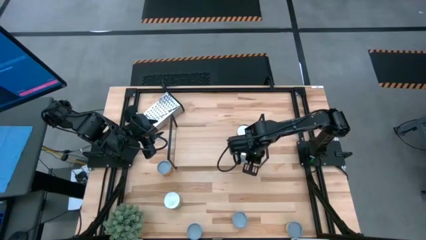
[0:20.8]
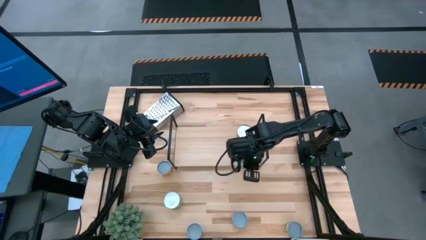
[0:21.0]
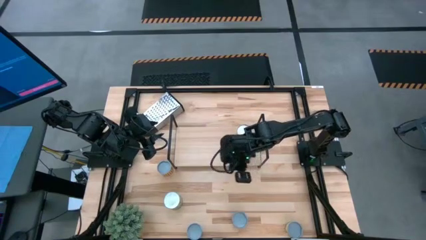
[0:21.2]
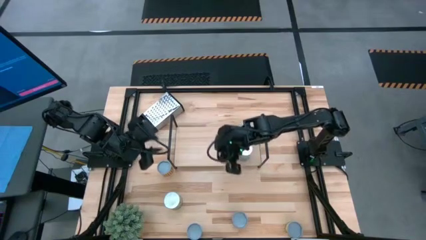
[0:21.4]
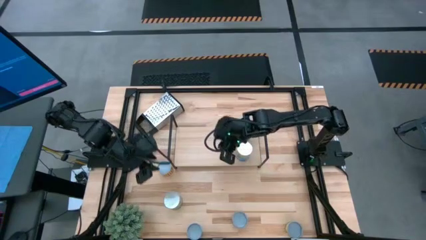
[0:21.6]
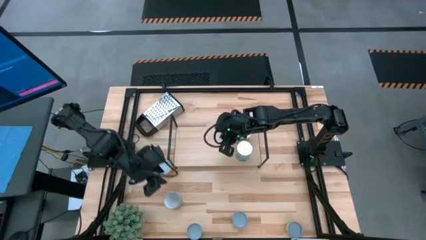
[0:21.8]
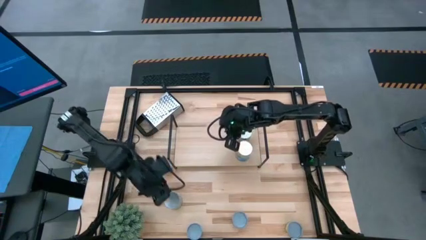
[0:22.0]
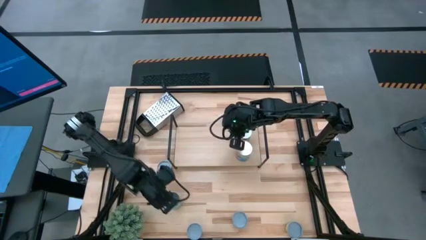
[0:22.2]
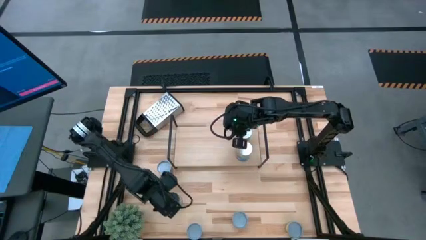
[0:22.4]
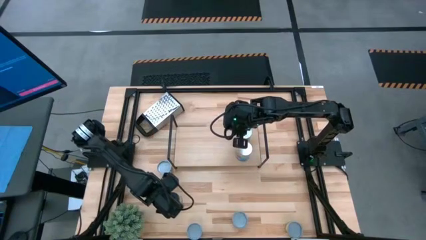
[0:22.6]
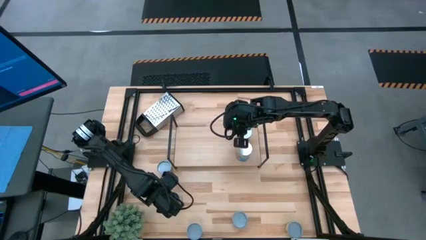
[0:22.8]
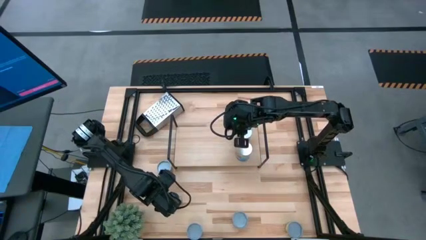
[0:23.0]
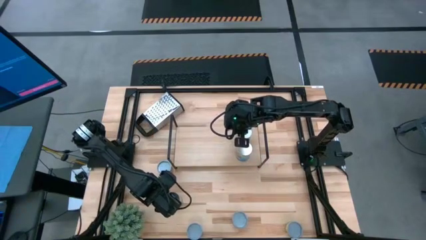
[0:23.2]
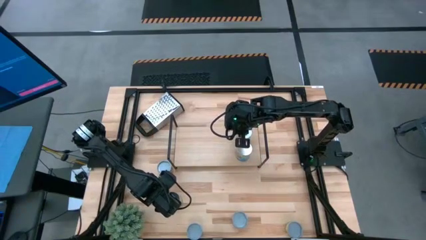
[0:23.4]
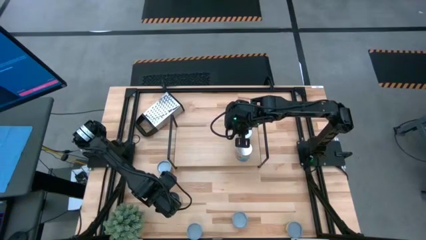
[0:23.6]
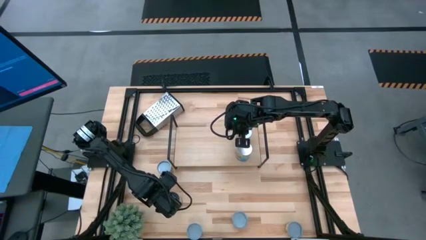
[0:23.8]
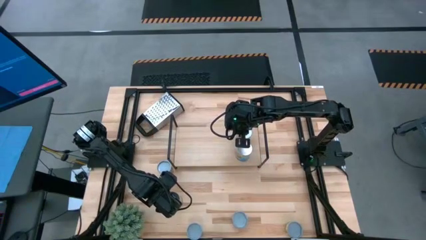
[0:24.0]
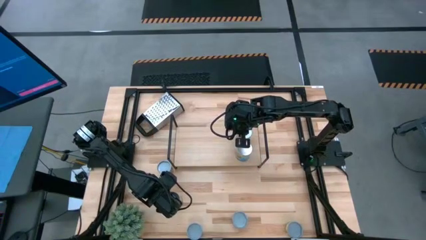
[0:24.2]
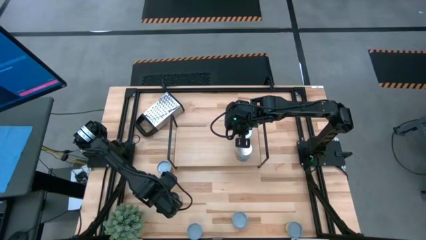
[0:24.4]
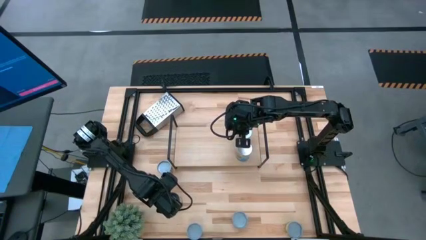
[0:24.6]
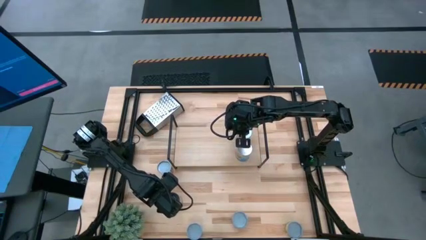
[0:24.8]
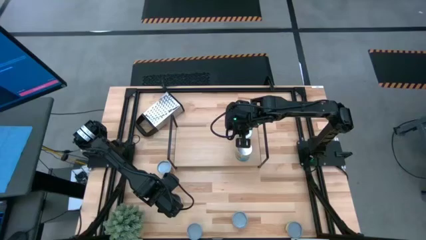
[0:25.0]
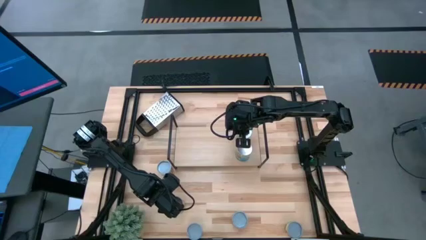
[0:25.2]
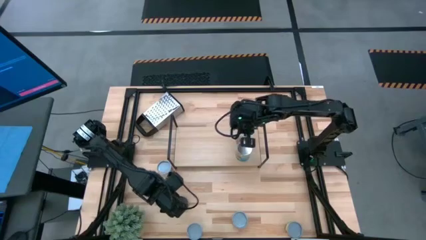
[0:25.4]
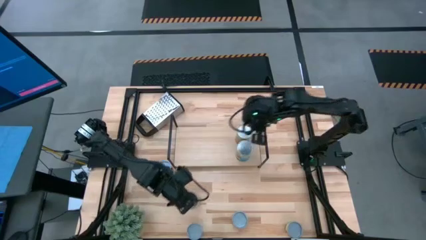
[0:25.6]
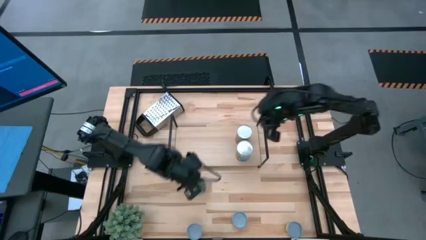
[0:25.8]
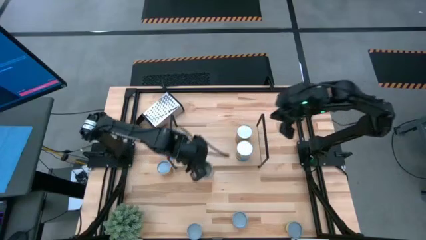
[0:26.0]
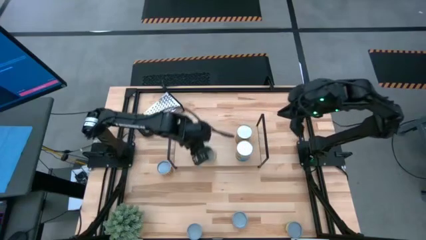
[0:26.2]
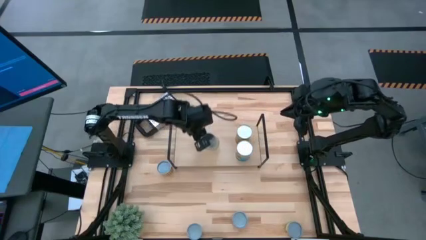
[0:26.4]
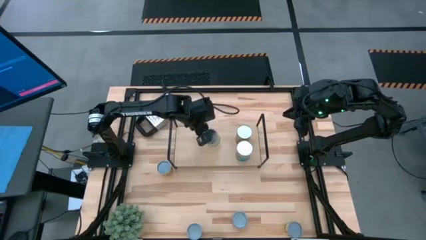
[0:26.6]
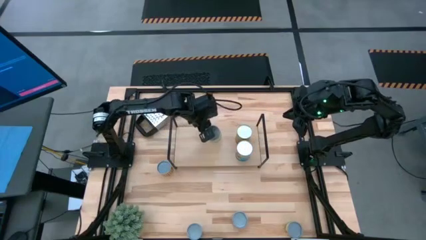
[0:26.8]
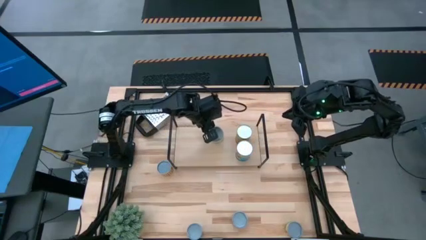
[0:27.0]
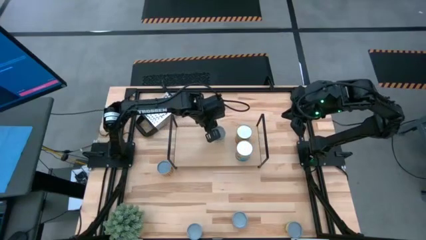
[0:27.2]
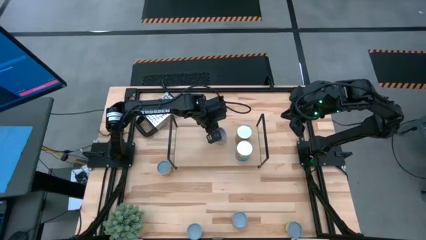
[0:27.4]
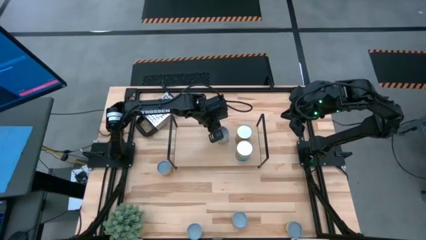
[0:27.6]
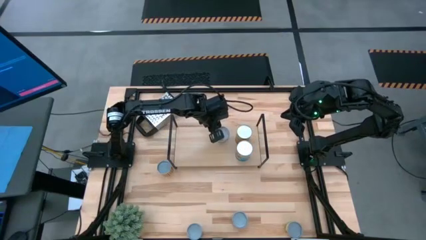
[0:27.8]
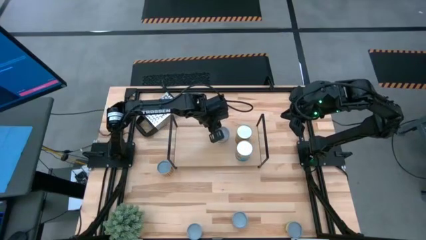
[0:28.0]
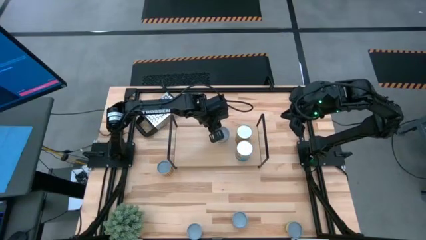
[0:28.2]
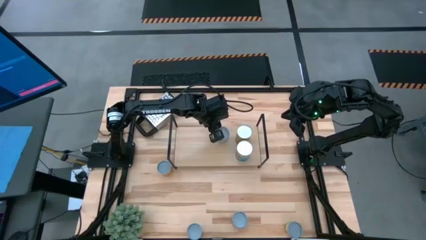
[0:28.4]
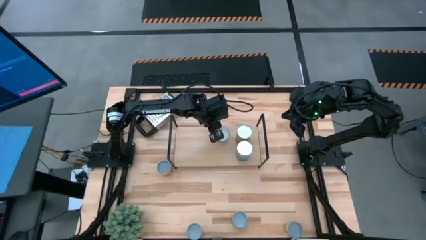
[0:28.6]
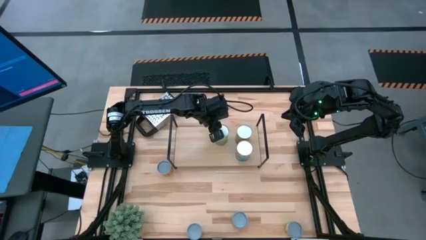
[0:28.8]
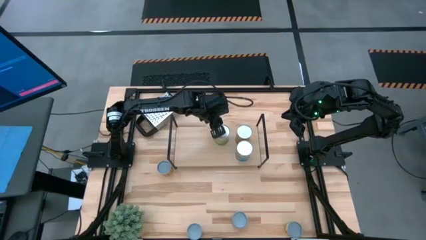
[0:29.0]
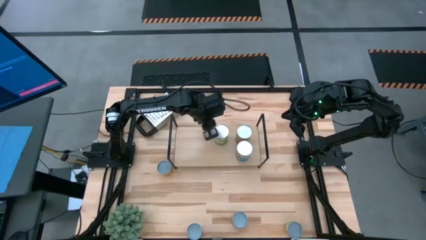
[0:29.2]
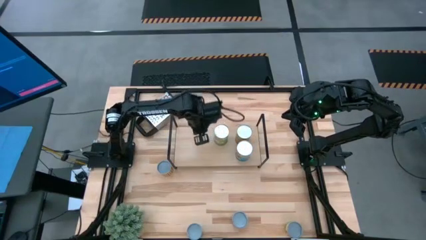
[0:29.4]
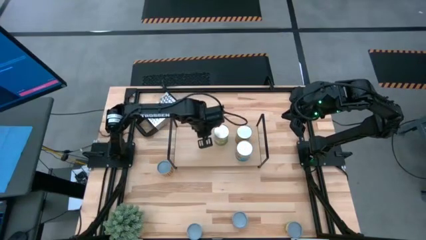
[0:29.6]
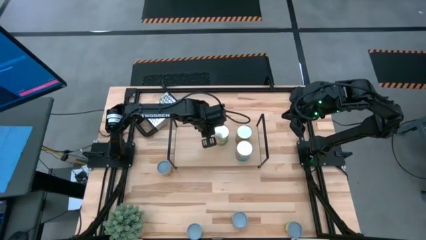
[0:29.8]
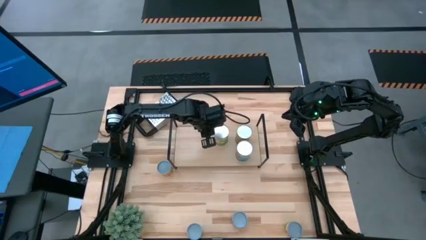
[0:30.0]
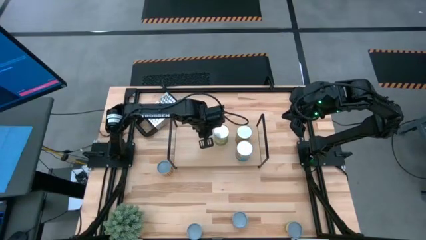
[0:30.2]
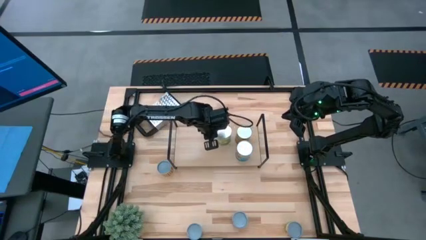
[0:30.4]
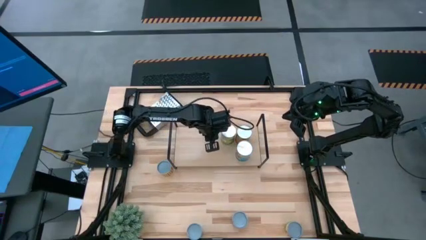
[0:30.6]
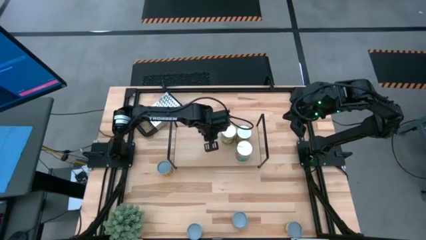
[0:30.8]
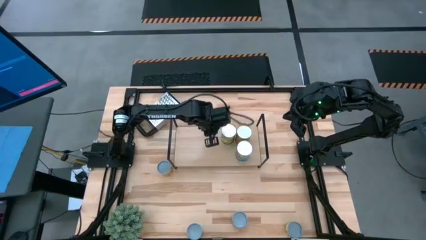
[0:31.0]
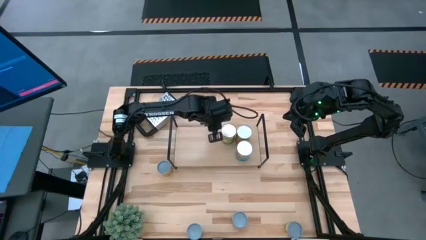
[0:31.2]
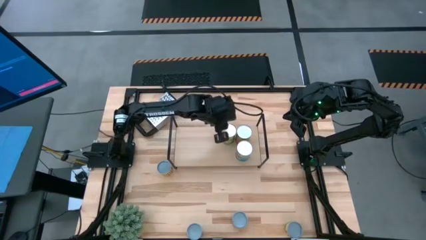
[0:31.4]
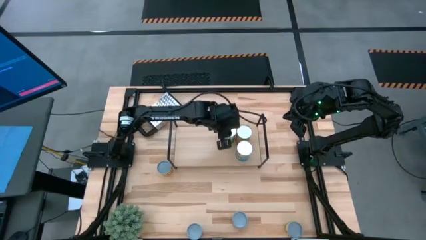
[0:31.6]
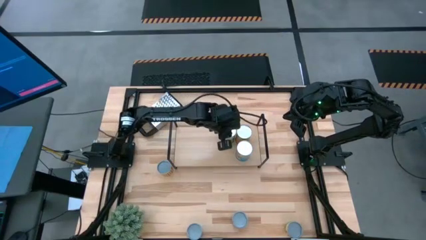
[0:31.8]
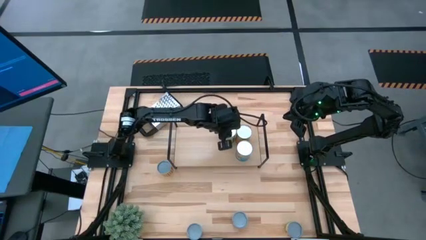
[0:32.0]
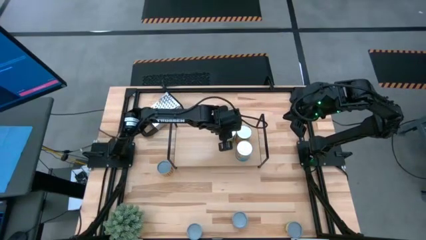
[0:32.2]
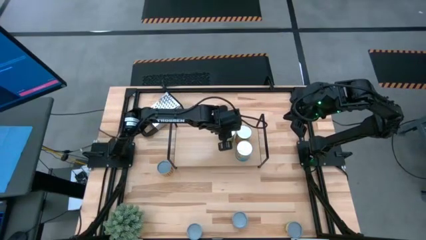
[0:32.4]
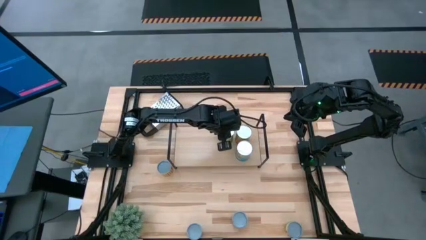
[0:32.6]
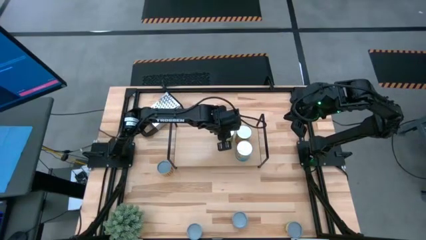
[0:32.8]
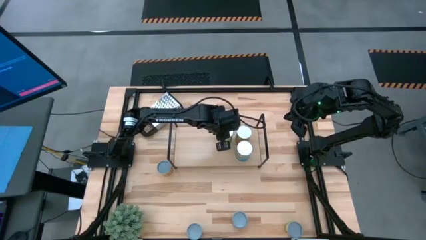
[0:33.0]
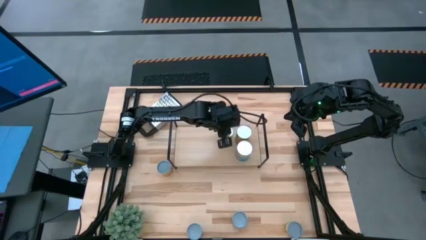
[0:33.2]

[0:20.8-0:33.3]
Task: Pick and place cans onto a shelf
Put the canned pears on the shelf

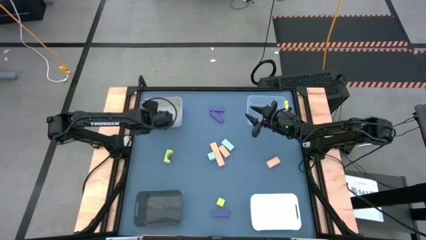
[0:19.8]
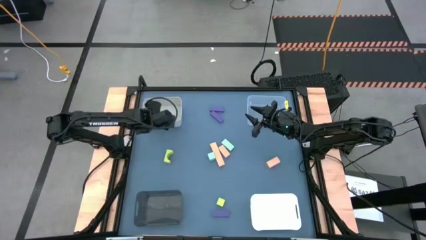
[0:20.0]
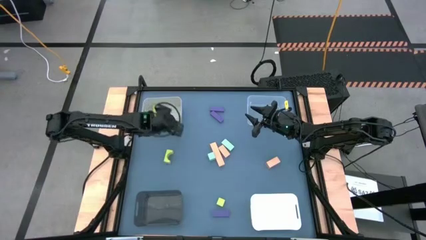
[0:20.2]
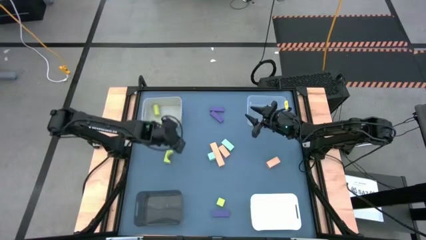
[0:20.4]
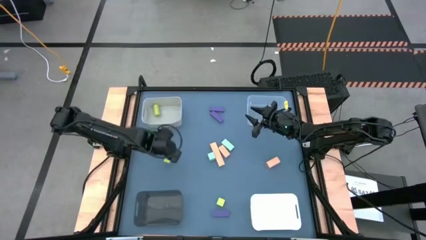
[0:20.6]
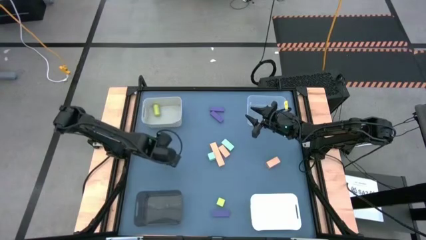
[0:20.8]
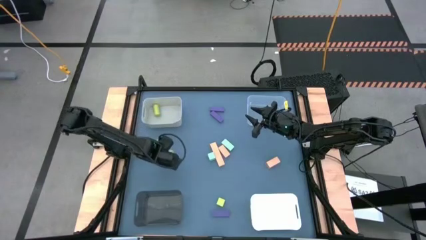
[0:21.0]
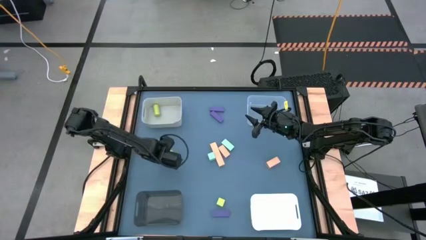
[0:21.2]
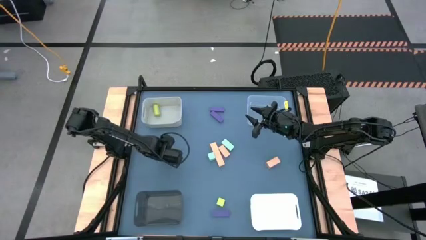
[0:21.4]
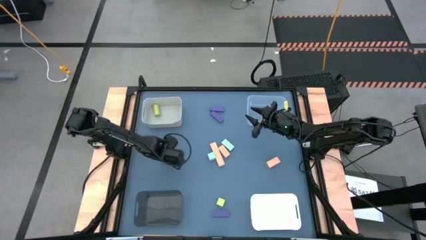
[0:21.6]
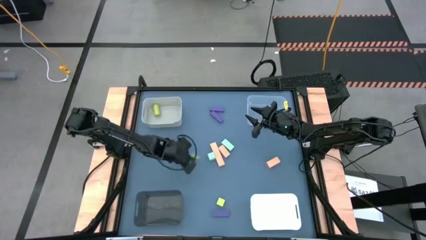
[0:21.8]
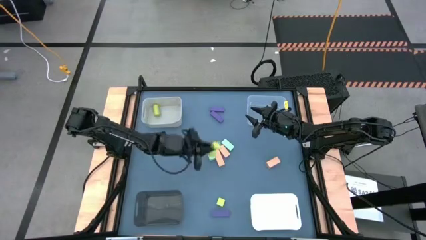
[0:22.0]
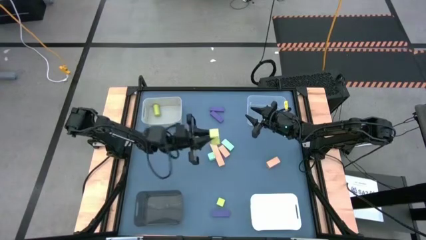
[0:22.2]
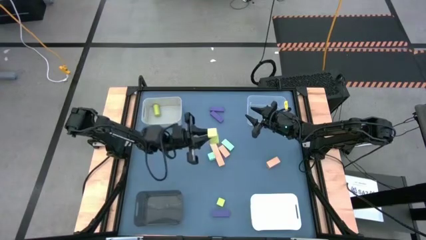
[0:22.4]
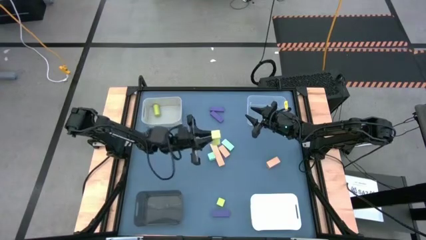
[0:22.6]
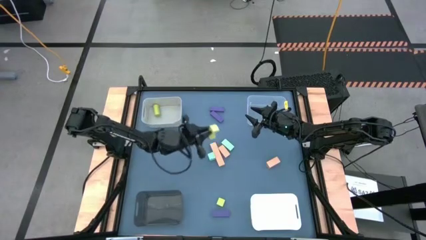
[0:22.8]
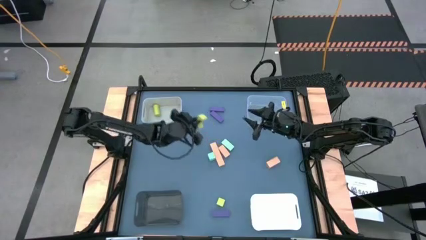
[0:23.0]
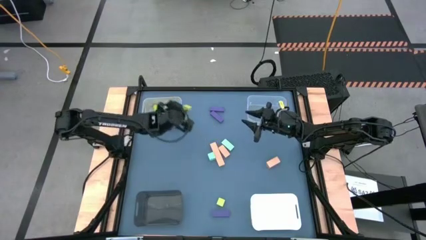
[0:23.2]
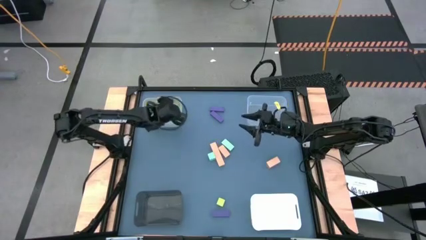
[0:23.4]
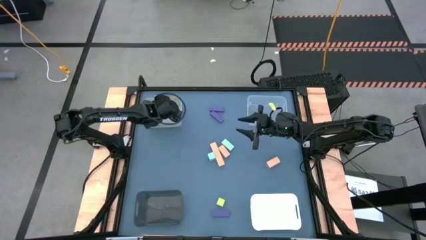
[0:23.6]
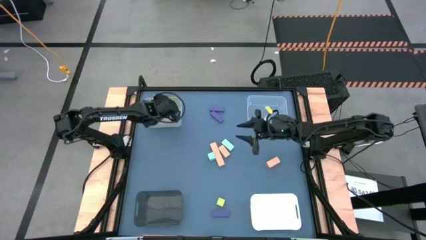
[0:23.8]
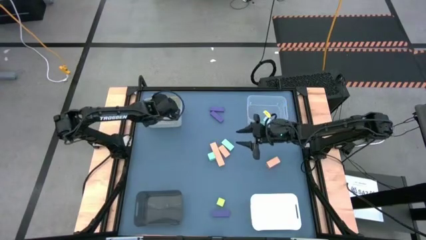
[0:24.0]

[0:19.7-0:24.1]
Task: Sort & place blocks by color
Put the green block into the gray bin
